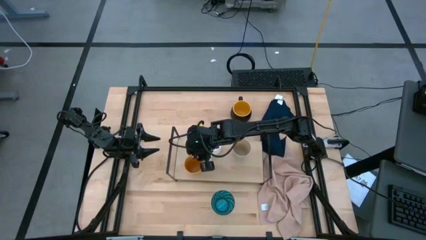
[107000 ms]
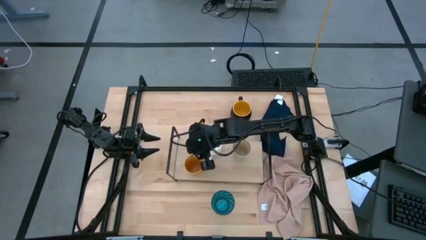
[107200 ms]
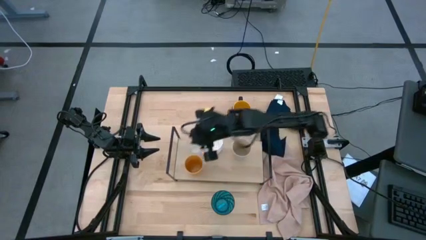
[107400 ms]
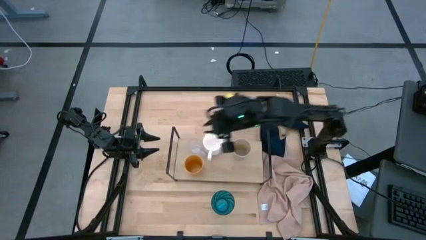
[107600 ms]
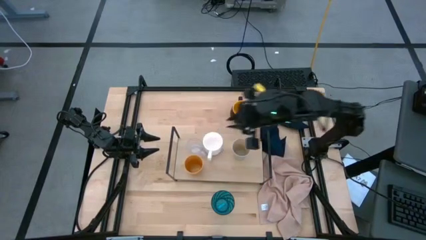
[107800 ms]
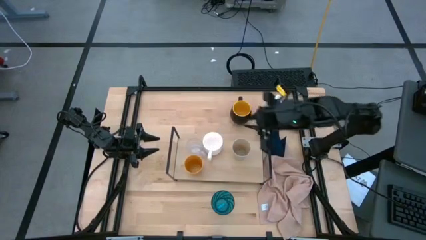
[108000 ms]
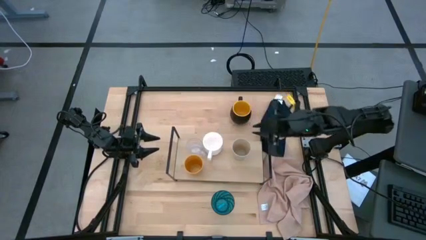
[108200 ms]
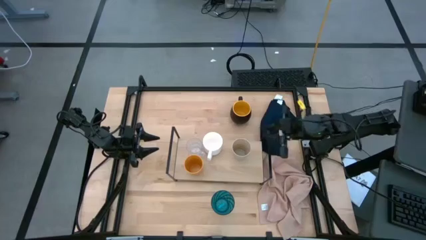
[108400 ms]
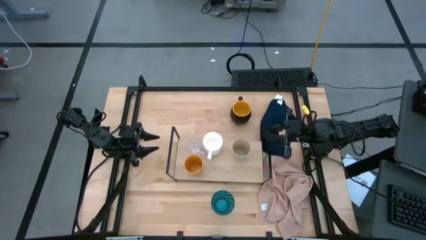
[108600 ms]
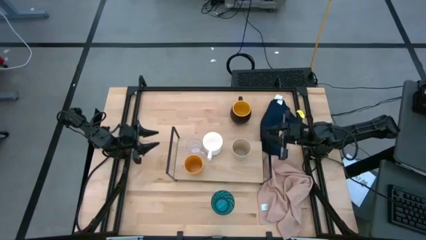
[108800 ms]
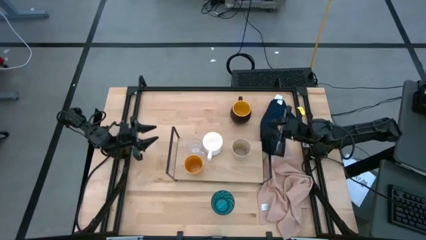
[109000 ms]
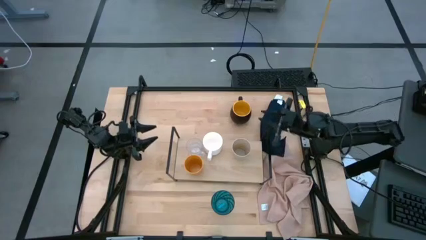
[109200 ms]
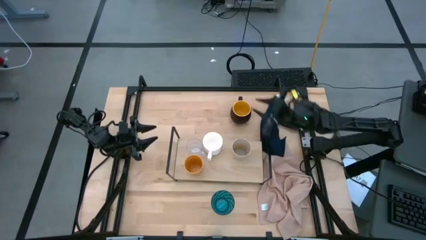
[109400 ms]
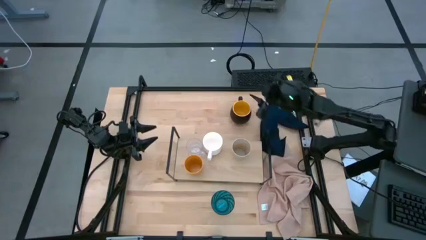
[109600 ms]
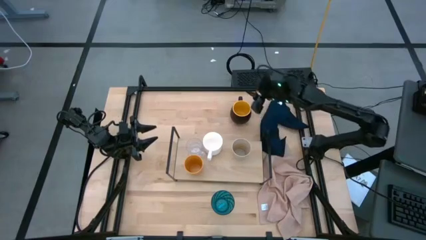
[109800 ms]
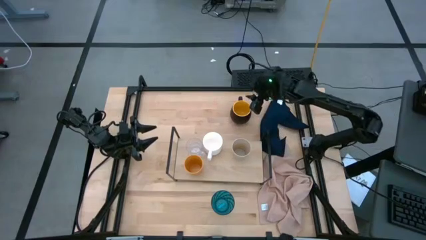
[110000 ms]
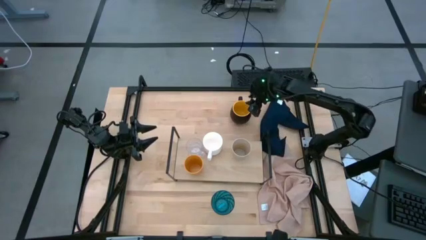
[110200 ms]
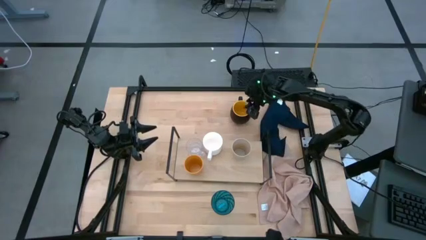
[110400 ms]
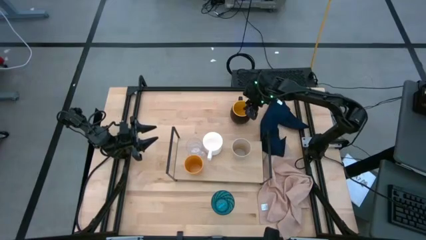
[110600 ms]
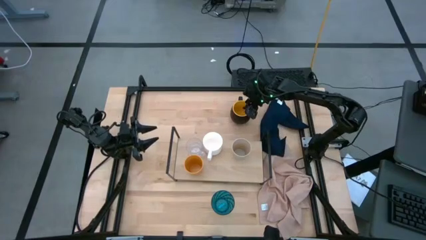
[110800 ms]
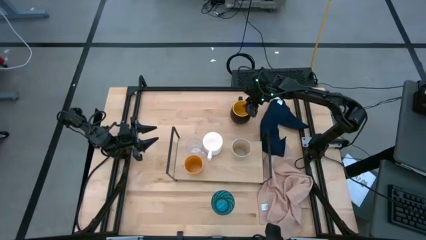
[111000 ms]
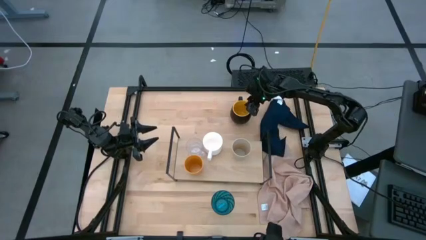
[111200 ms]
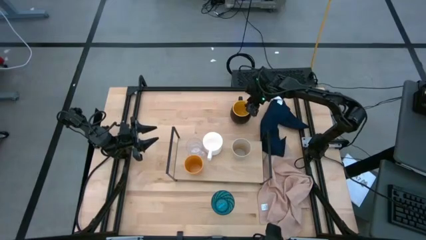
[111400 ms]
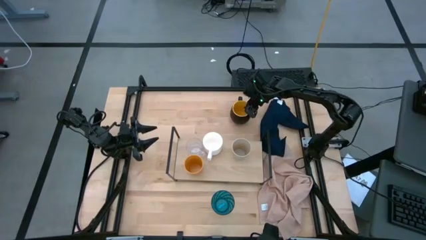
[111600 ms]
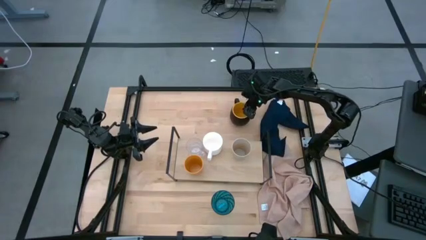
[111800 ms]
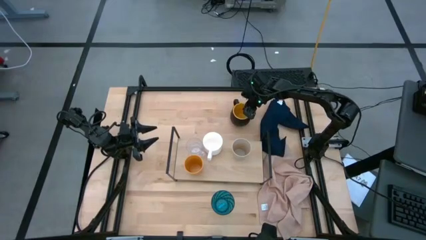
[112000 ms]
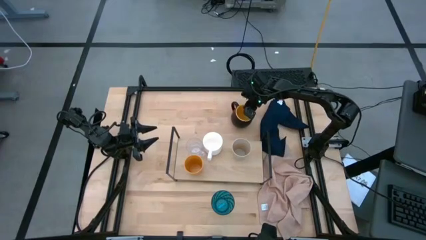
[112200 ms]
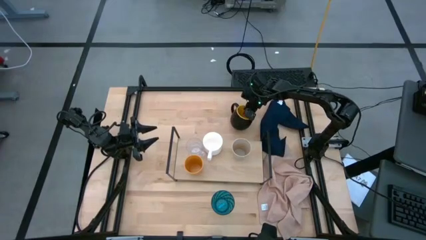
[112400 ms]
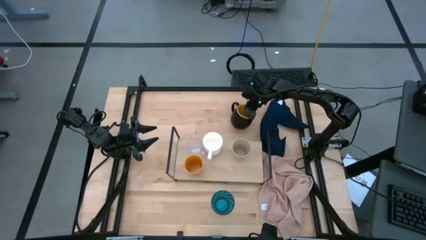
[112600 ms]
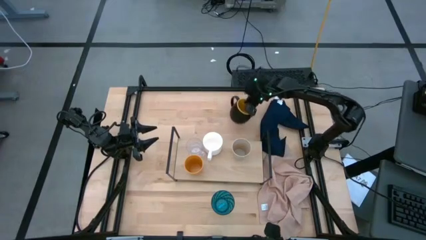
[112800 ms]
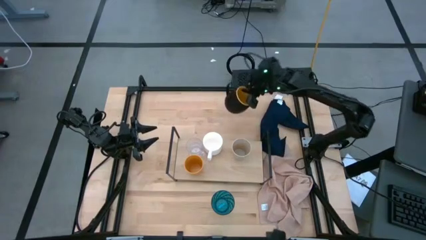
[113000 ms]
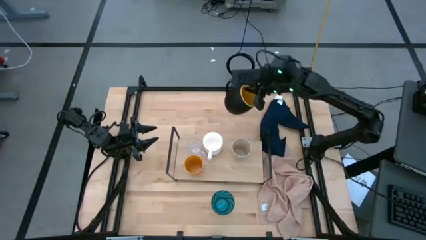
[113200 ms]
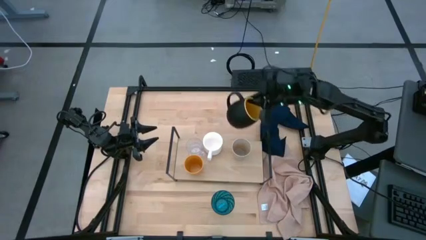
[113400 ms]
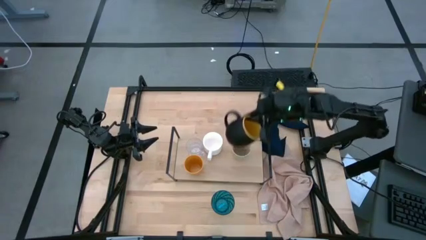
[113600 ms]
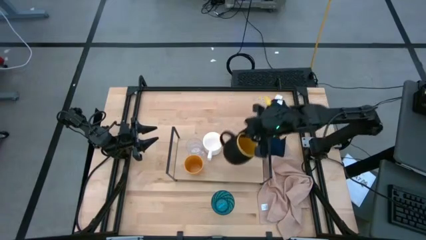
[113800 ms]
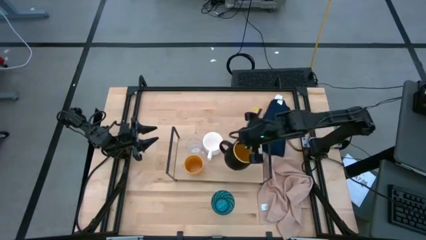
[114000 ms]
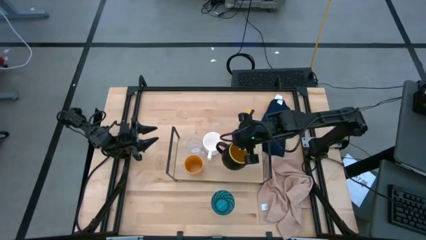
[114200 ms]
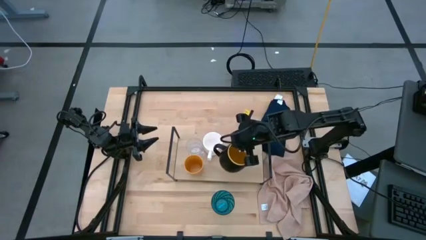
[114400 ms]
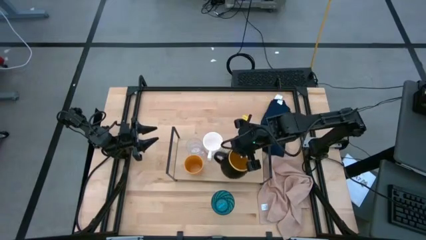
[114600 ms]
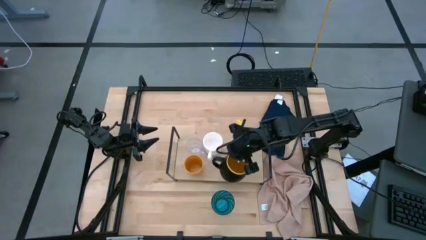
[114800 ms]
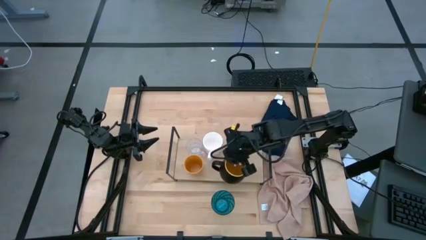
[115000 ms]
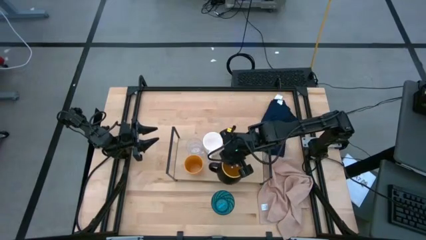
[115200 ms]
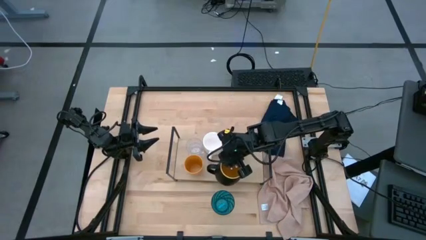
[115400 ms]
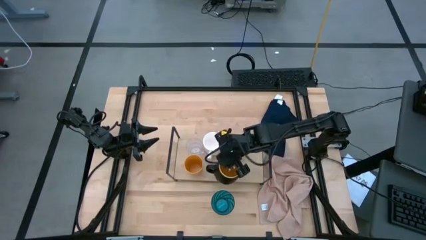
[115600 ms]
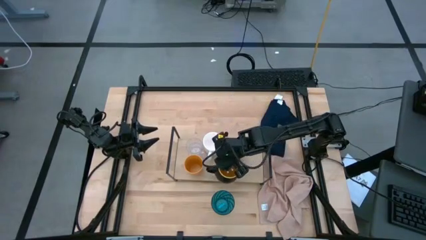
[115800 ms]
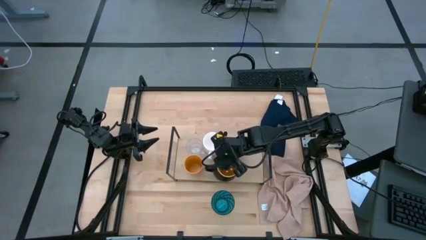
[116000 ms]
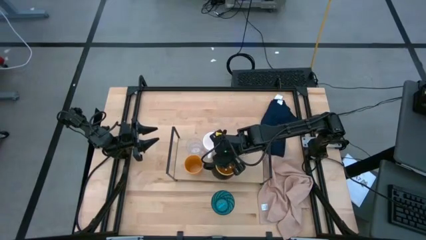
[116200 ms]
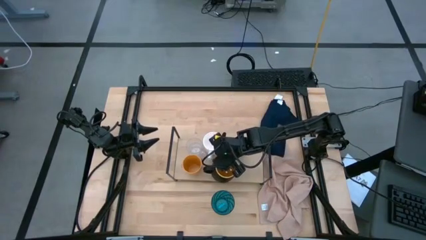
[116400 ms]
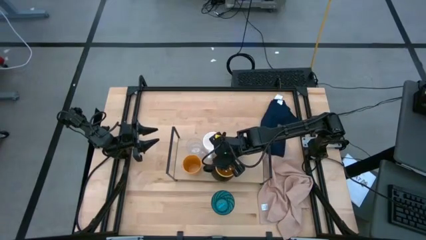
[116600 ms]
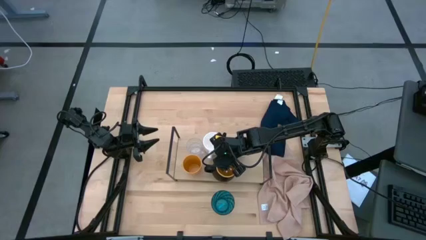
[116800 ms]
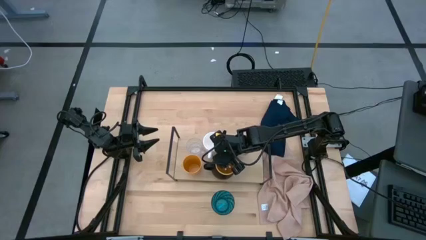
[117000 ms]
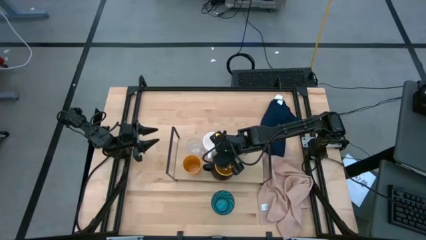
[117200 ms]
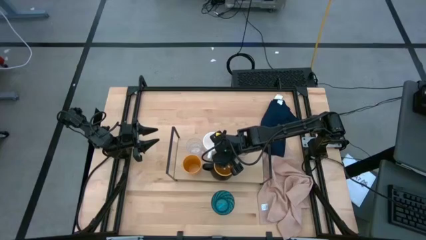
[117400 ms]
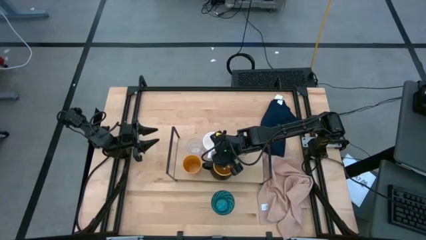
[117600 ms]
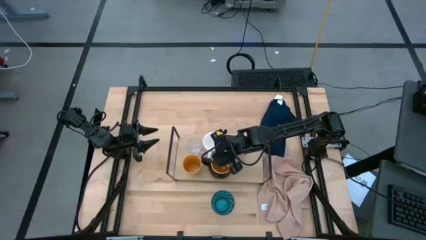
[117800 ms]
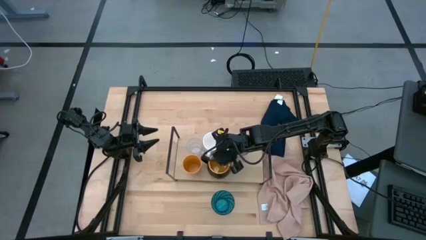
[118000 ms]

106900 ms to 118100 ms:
Task: Stack small to large cups/mugs on shelf
Align the black mug with the white mug on the shelf

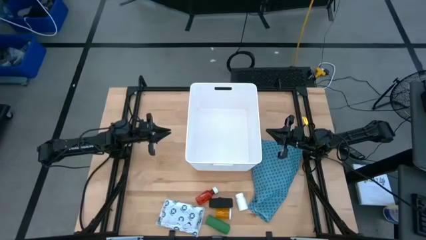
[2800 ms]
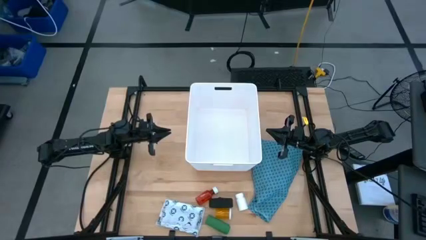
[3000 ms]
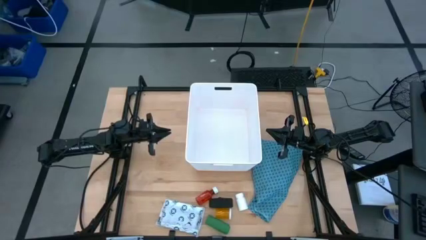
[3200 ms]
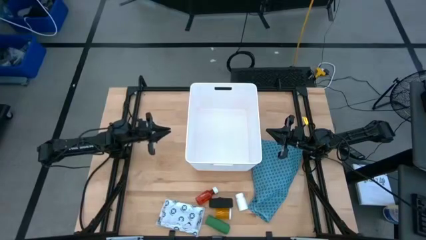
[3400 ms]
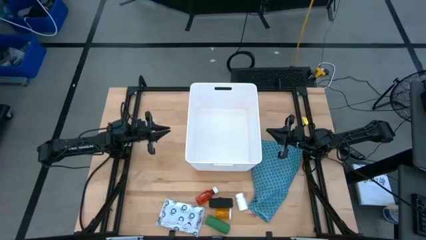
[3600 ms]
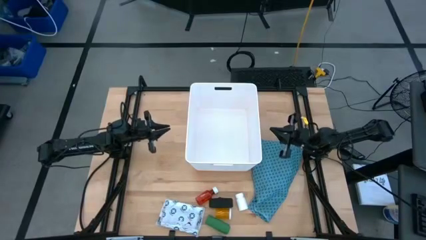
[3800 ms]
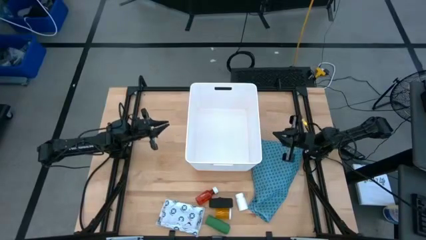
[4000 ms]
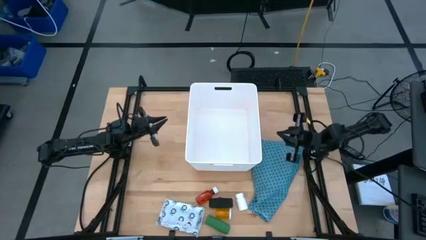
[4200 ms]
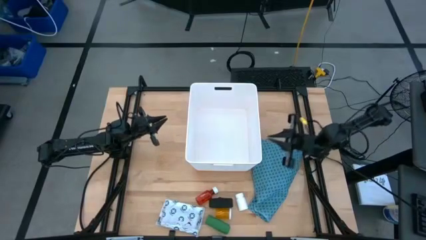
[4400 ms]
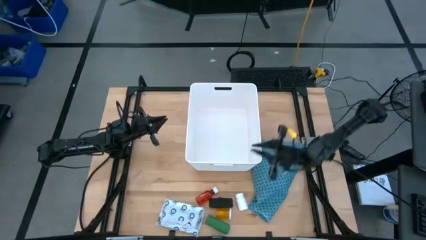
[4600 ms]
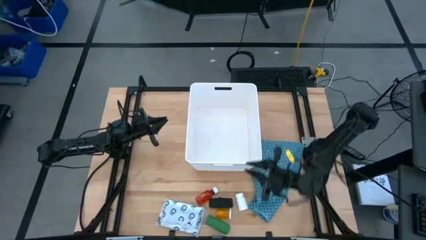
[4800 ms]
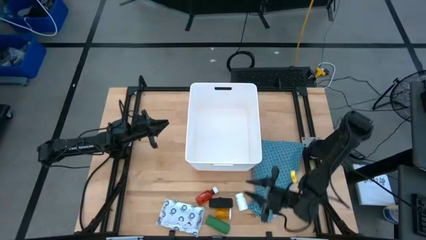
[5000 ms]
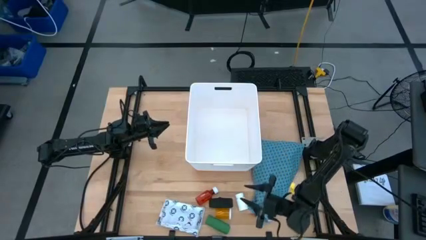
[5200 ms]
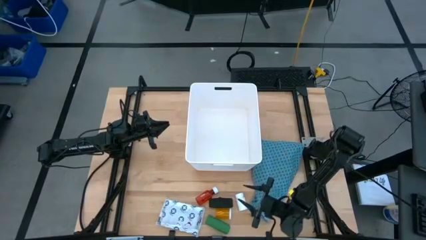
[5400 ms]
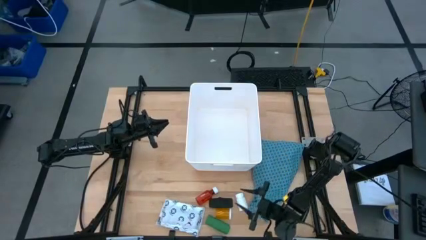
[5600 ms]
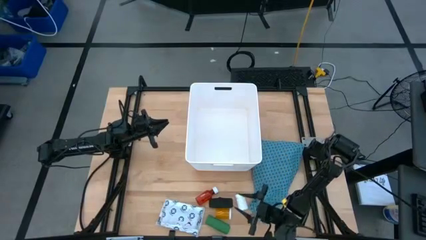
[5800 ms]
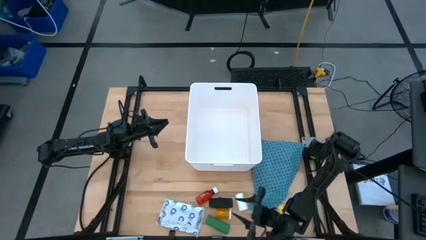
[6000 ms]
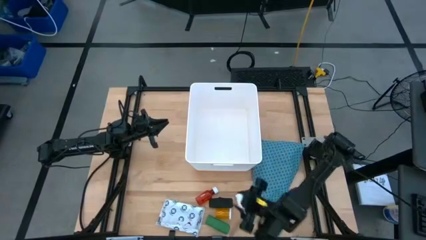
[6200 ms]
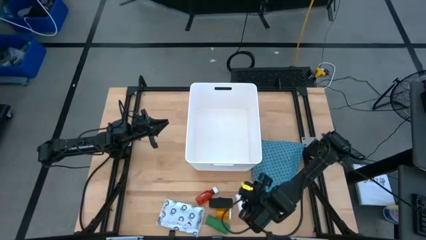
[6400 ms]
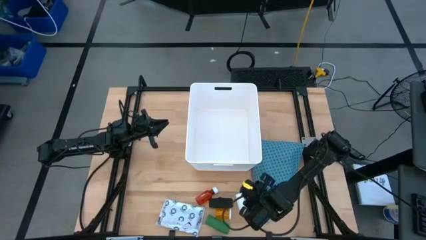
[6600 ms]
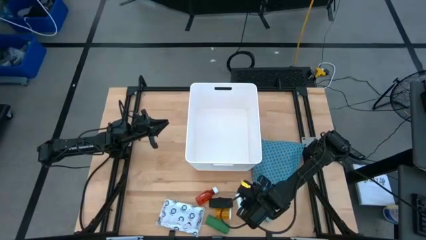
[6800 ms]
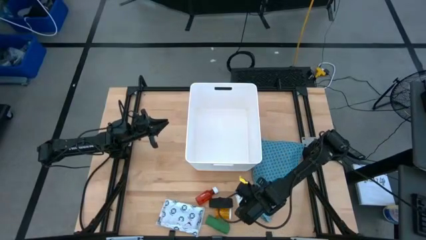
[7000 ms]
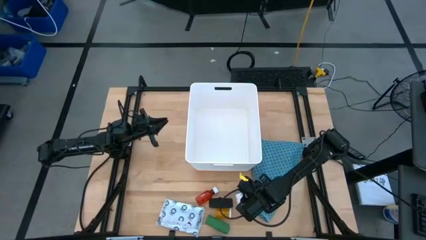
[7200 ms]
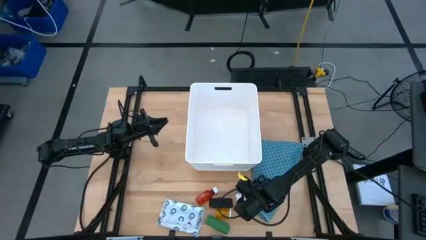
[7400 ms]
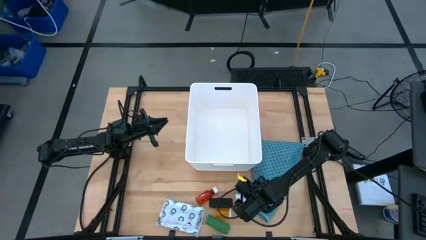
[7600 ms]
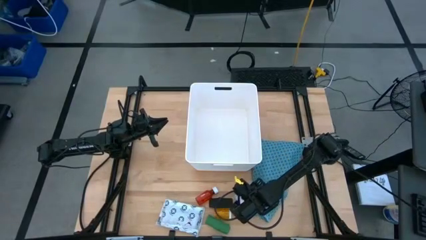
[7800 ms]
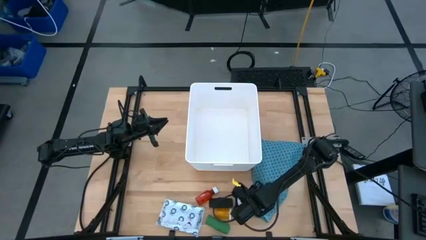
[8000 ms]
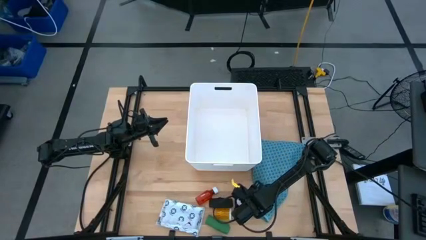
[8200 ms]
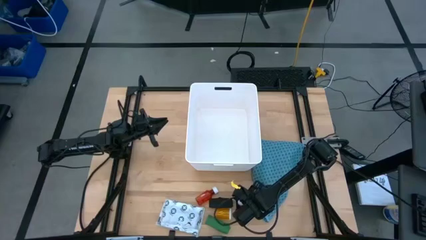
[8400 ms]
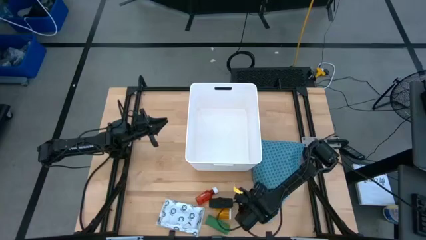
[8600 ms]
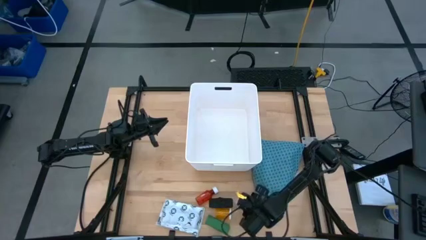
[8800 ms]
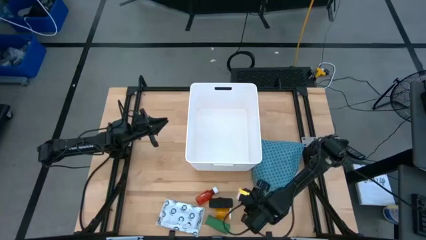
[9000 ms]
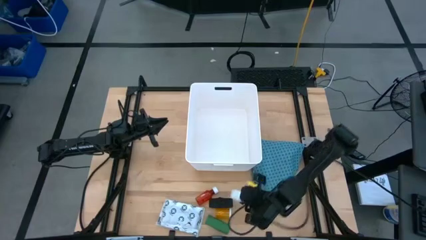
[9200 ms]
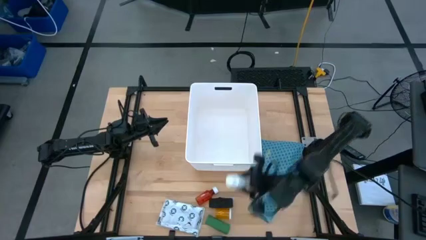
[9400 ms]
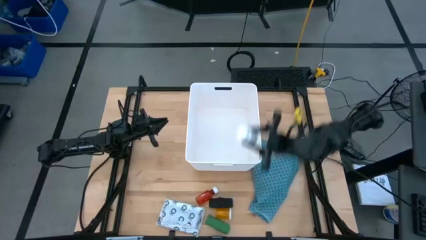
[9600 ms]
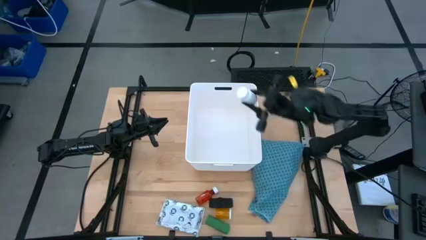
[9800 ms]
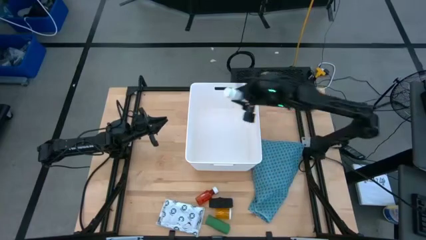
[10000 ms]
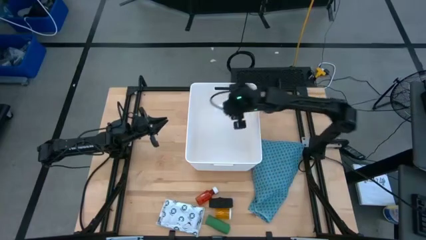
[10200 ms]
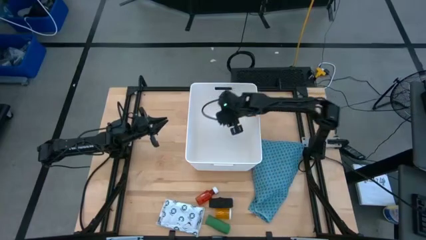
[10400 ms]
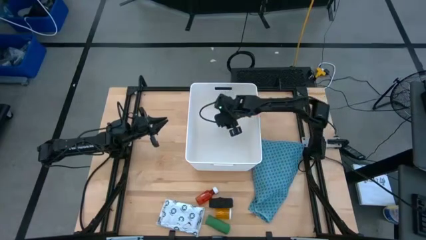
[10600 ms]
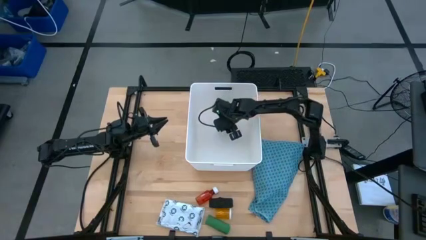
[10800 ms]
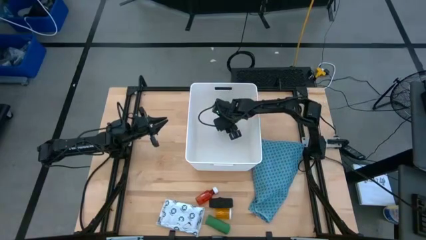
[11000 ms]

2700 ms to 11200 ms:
Task: Pick & place medical supplies in basket/bin
Put the white bottle into the white bin
